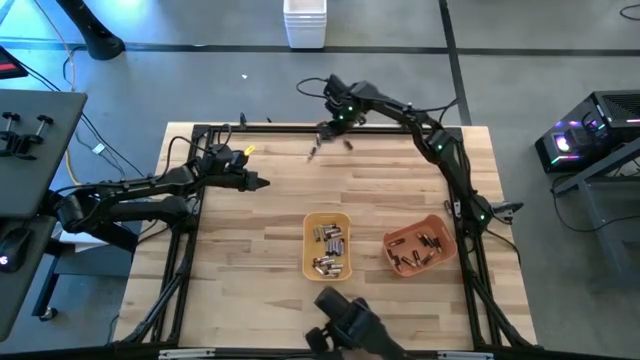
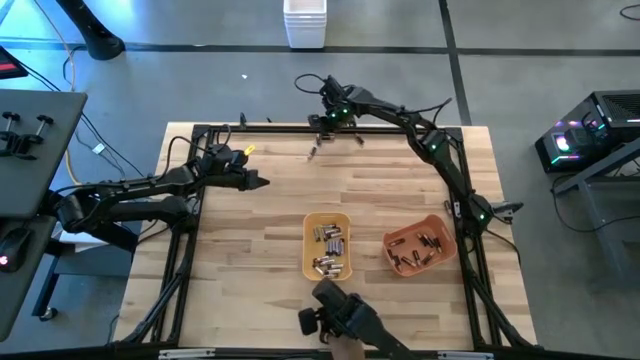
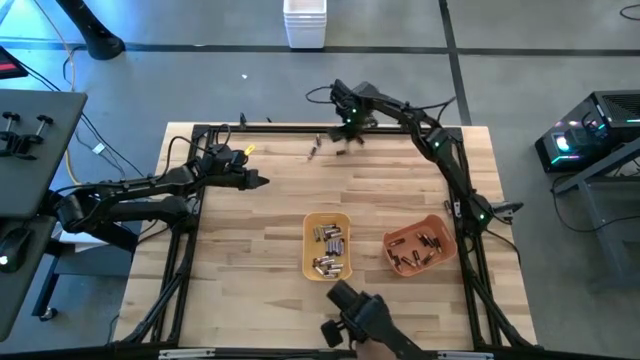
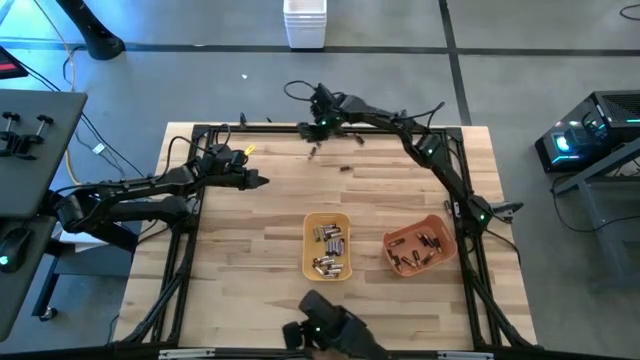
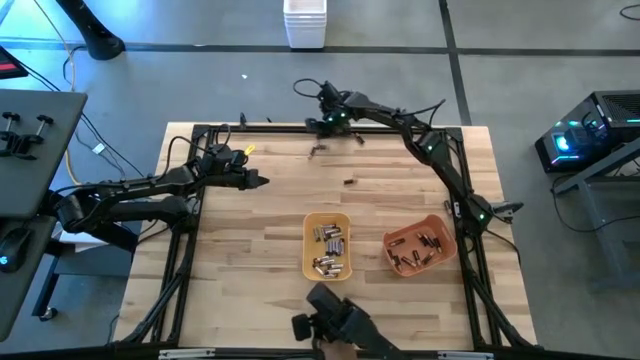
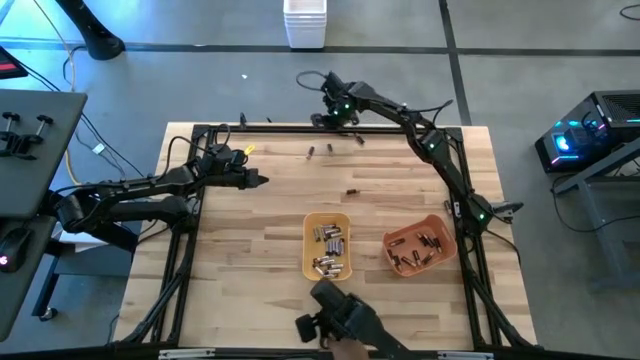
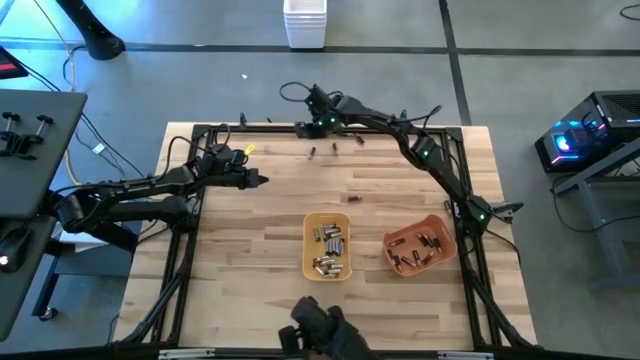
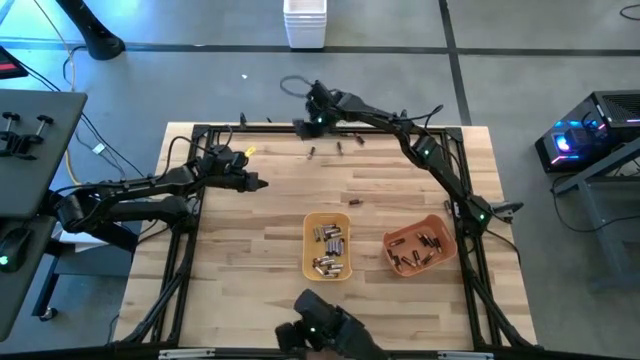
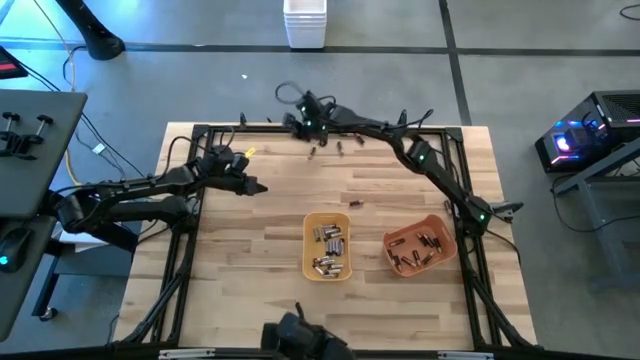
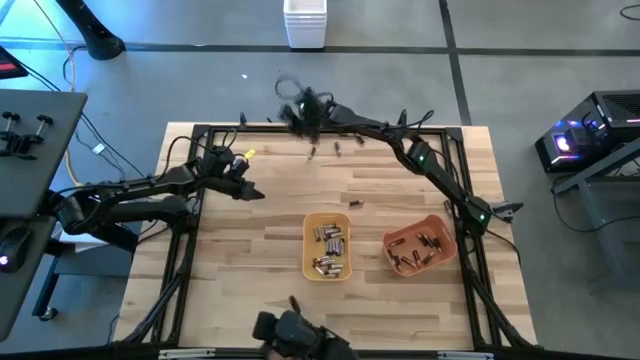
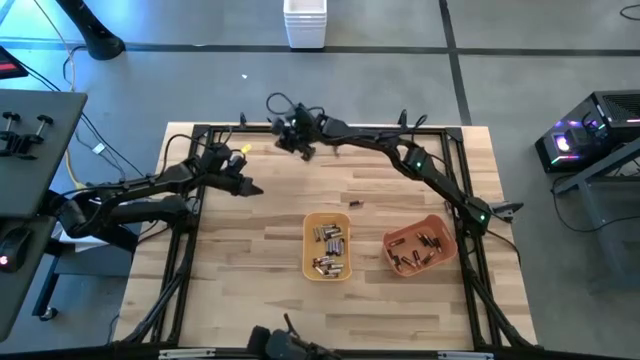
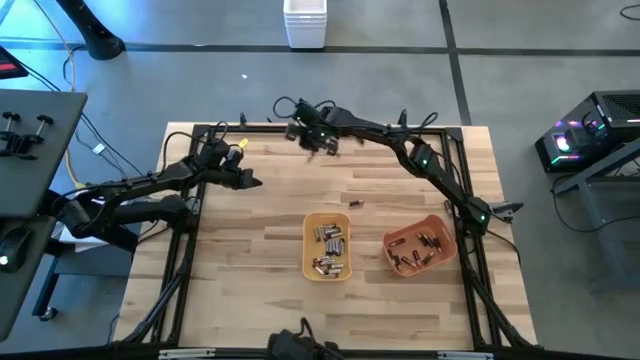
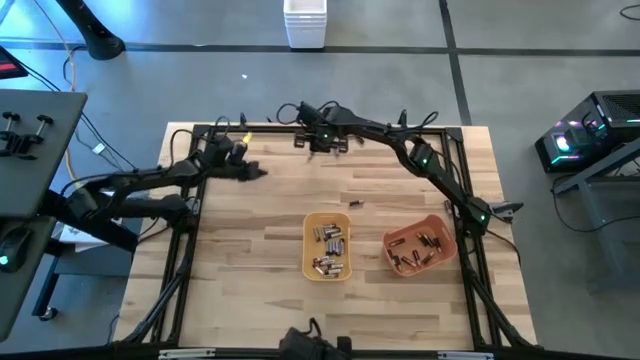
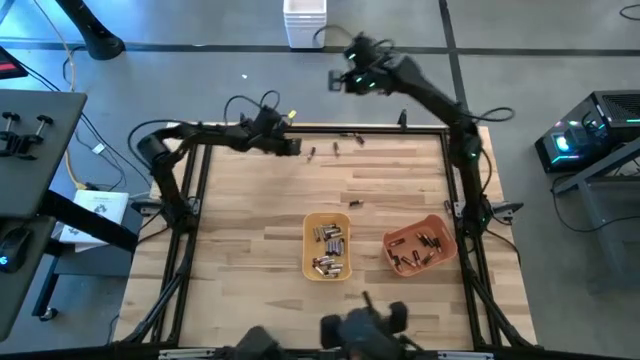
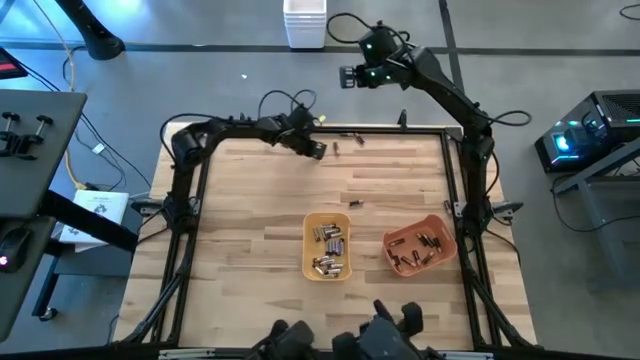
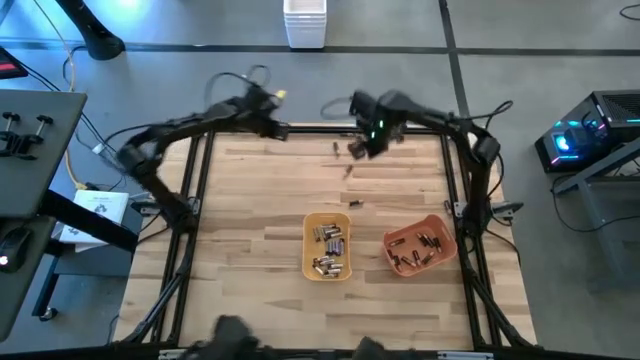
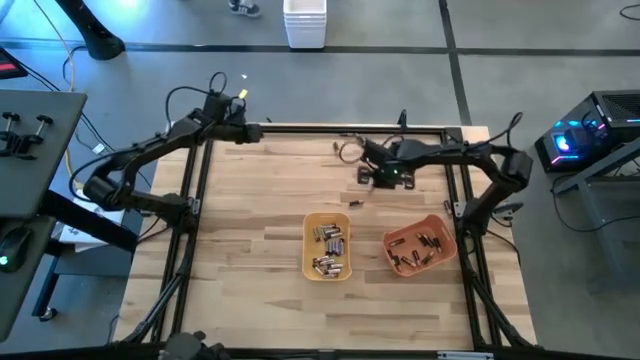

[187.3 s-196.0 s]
Task: Sort batteries
Adjust the black batteries

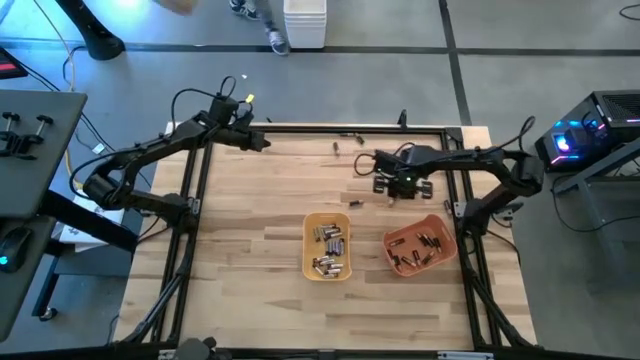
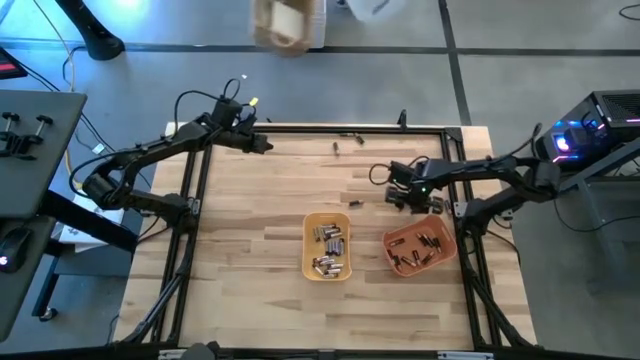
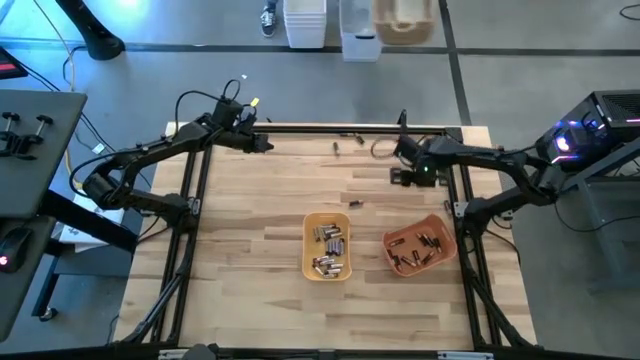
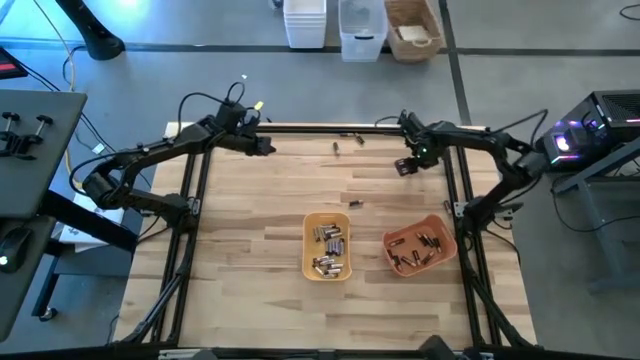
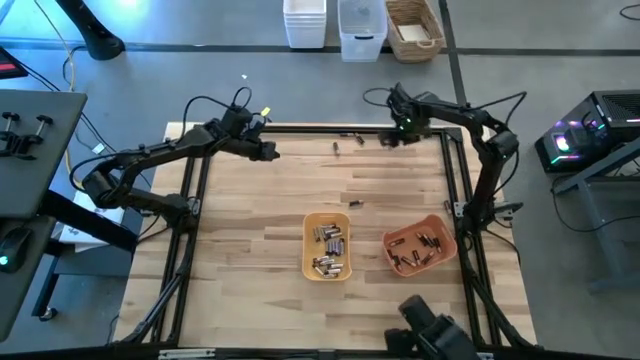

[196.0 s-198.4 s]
Put the black battery into the orange bin

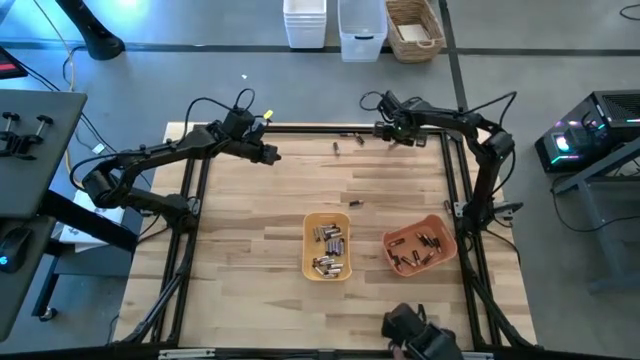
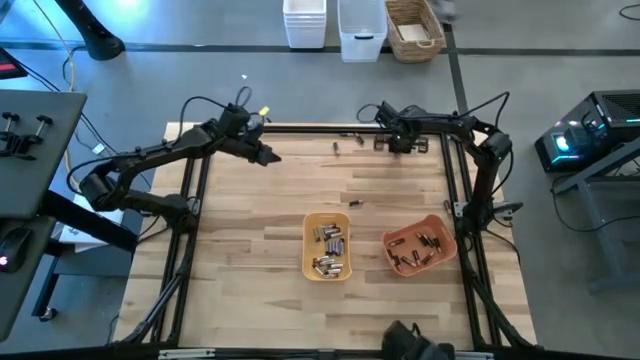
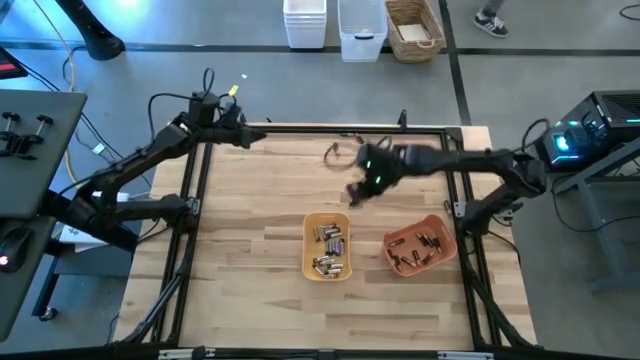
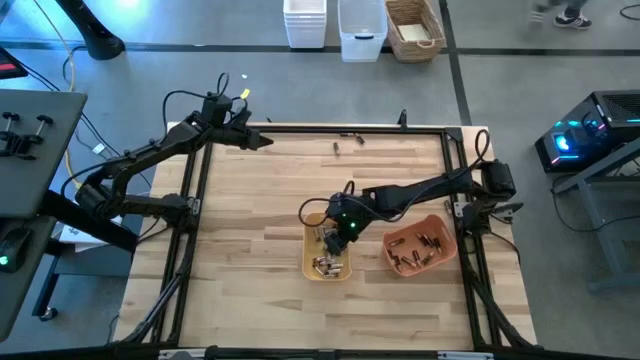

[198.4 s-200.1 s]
Put the black battery into the yellow bin

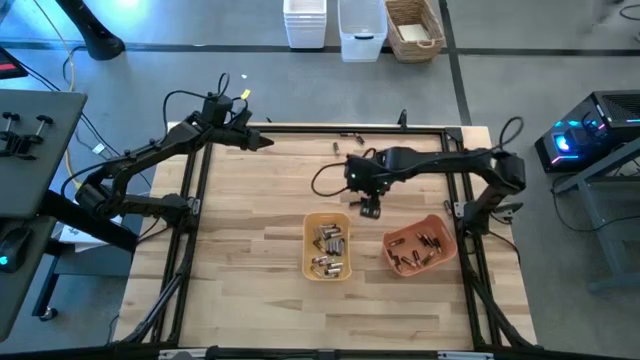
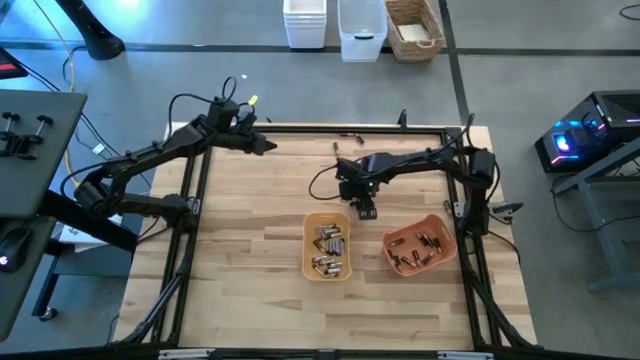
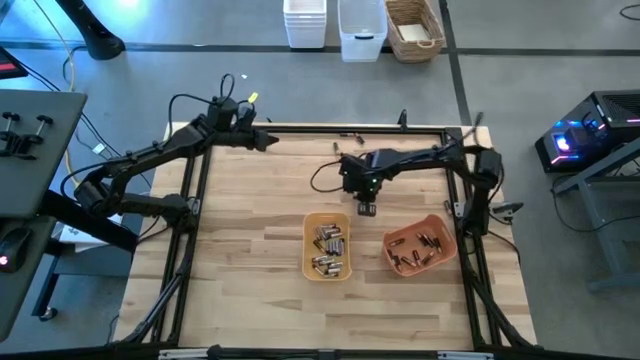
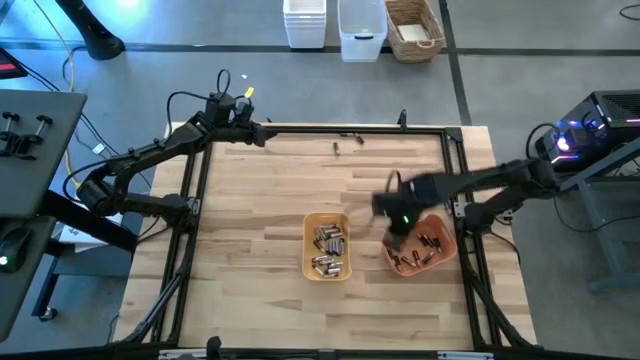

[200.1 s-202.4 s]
Put the black battery into the orange bin

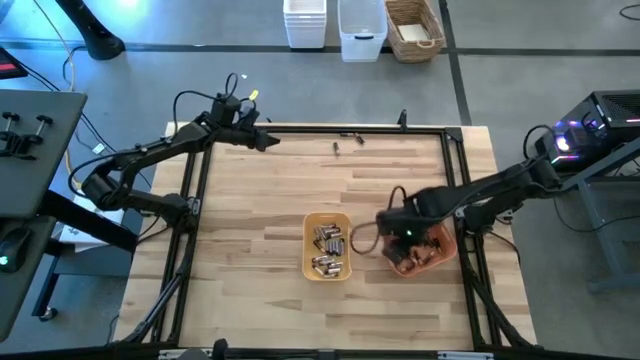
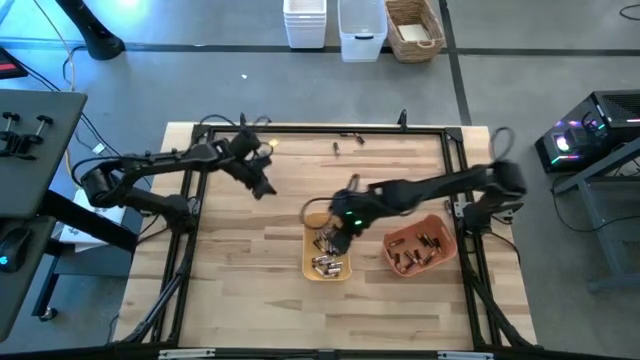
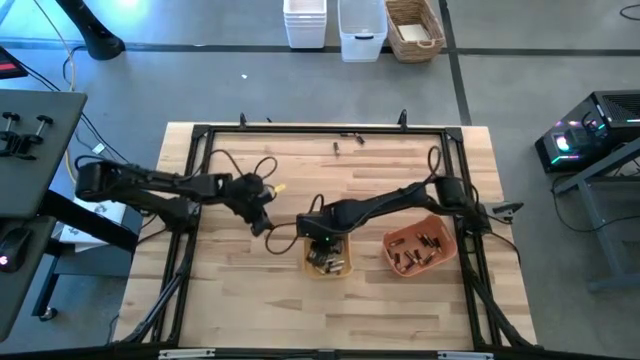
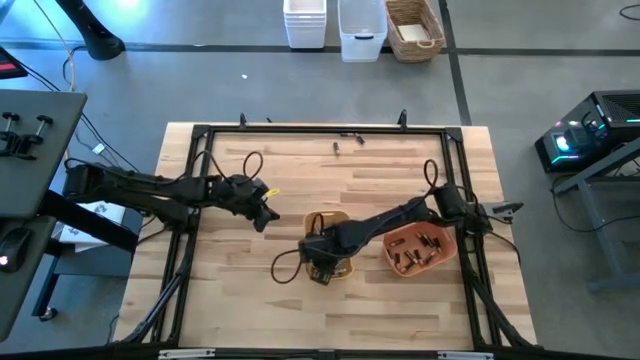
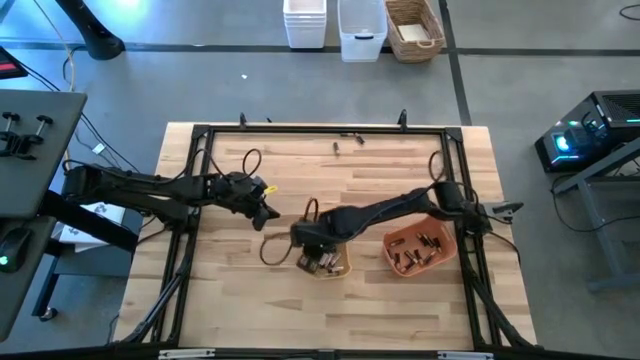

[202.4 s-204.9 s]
Move the black battery at the yellow bin to the orange bin

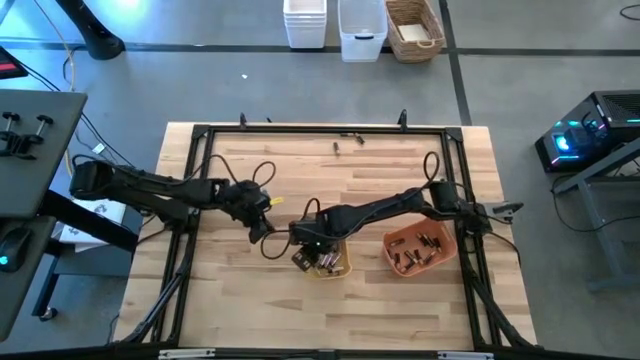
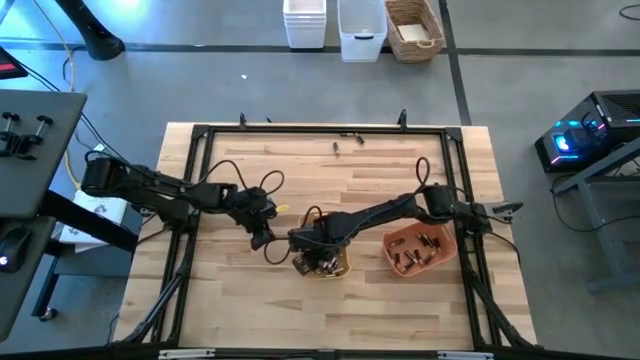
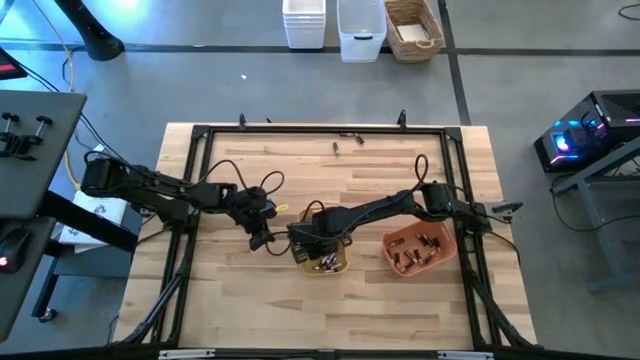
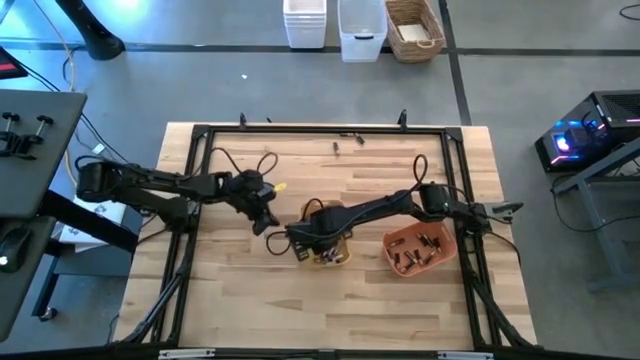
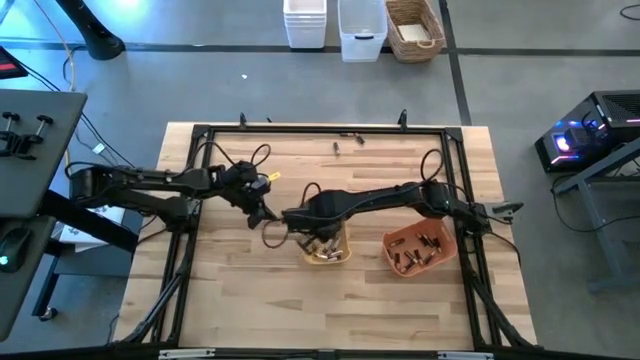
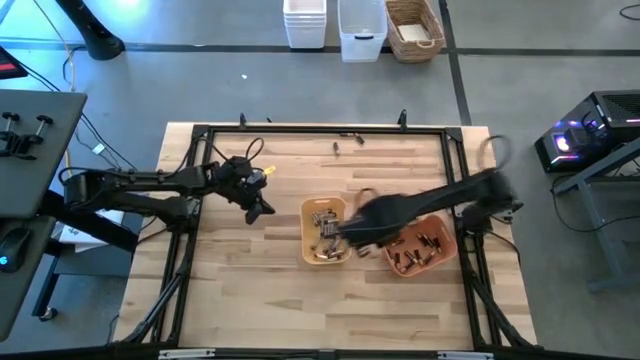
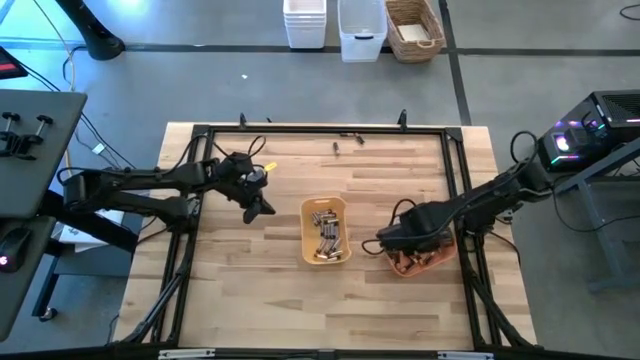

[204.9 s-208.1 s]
Move the black battery at the yellow bin to the orange bin

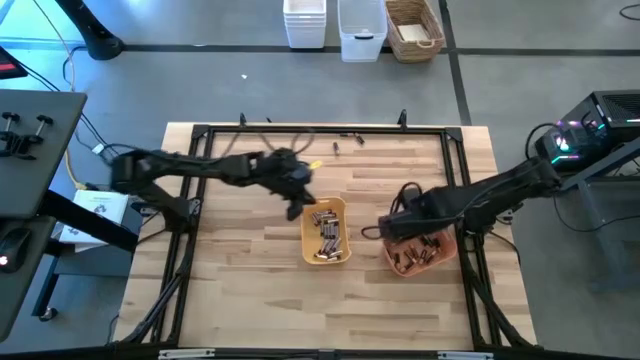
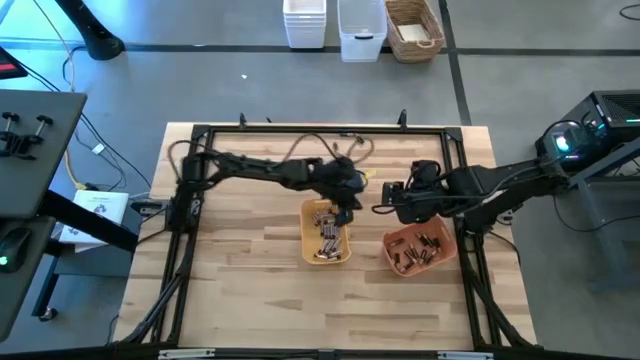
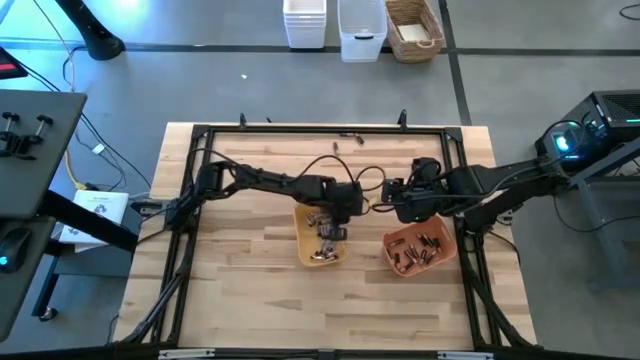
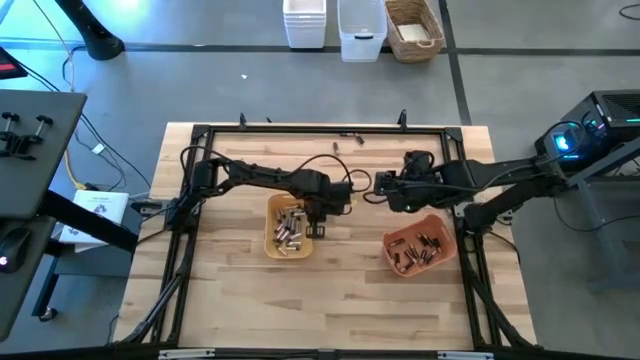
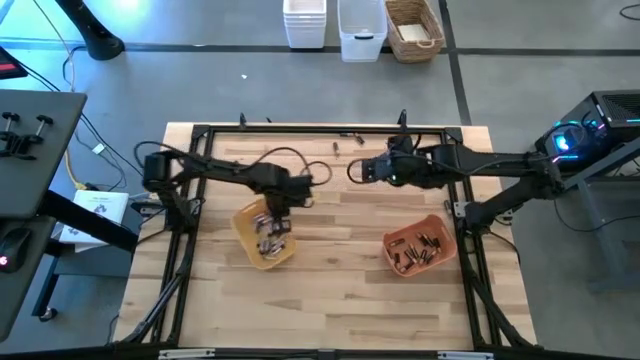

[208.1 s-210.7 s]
Adjust the yellow bin
